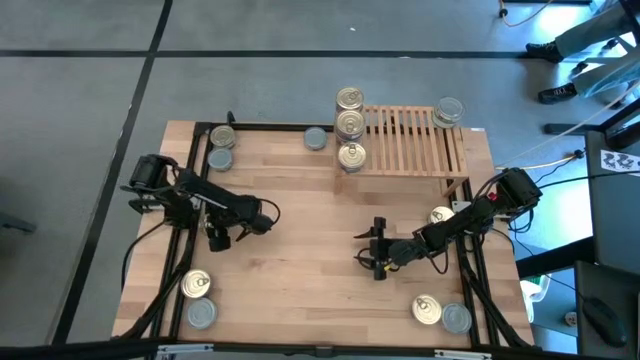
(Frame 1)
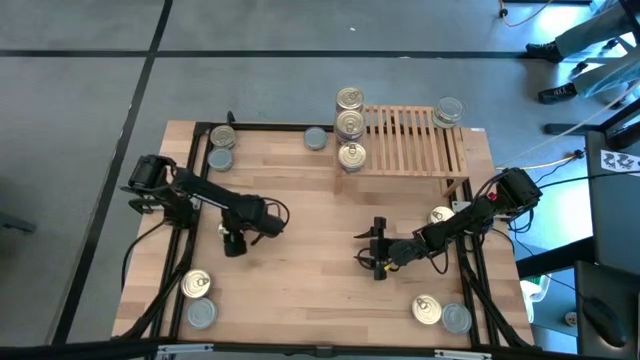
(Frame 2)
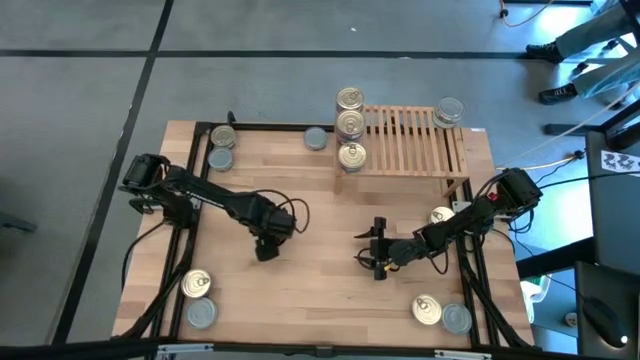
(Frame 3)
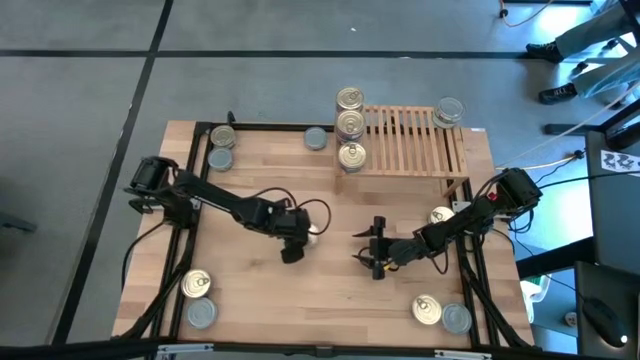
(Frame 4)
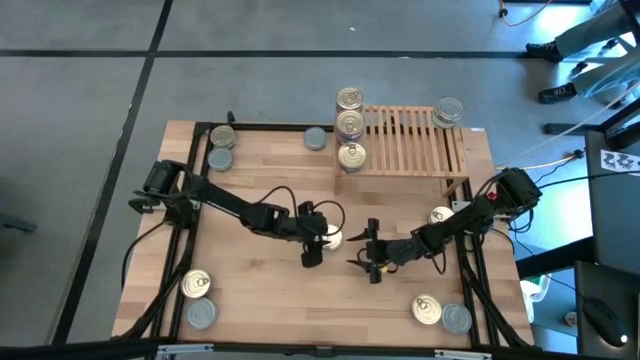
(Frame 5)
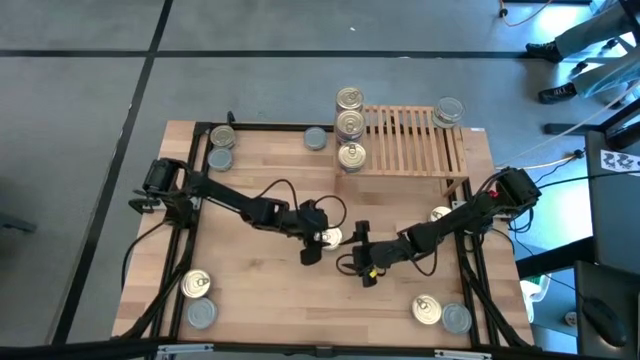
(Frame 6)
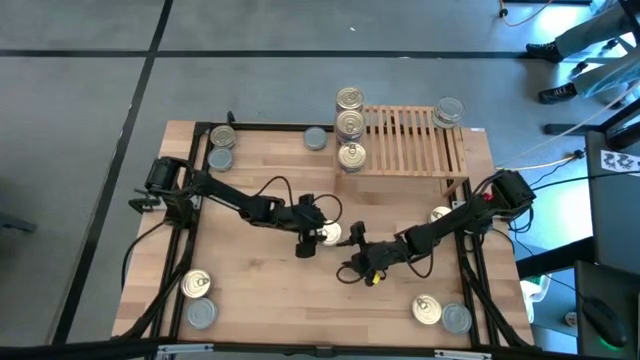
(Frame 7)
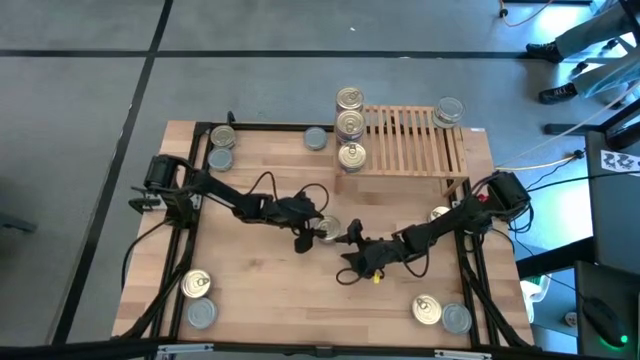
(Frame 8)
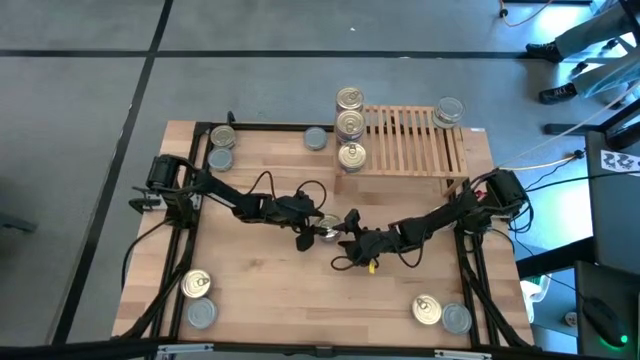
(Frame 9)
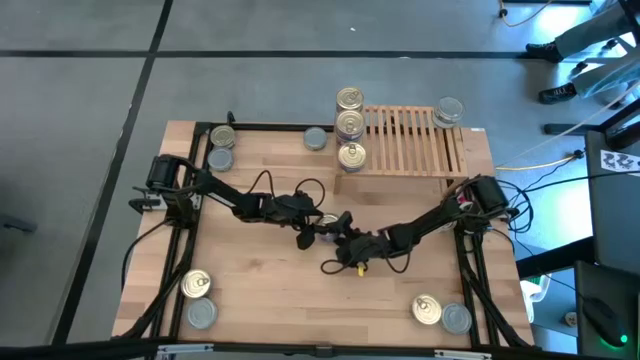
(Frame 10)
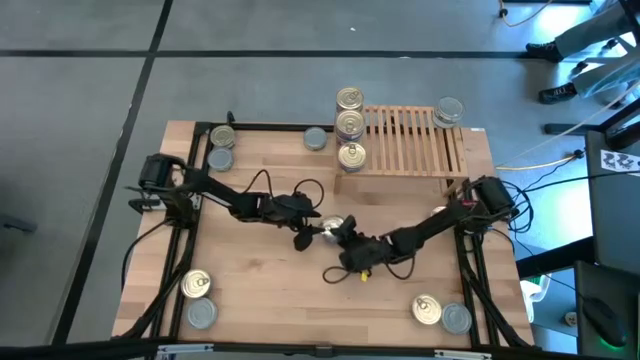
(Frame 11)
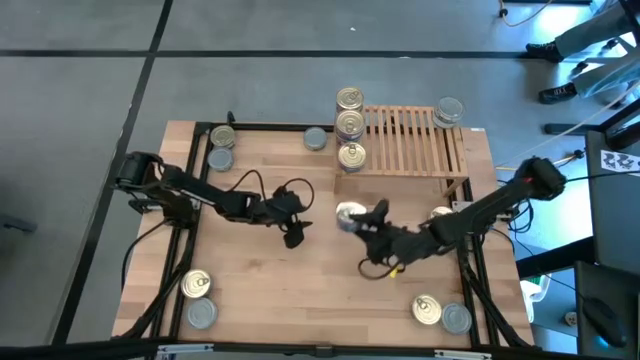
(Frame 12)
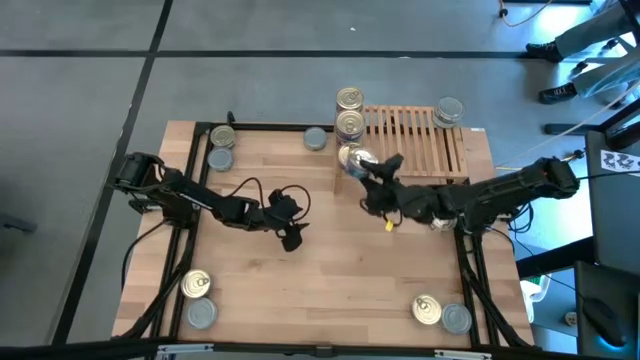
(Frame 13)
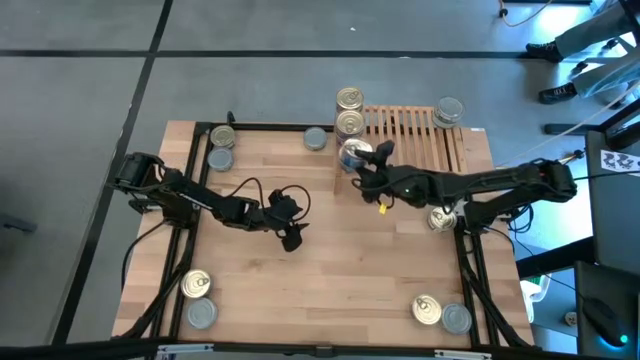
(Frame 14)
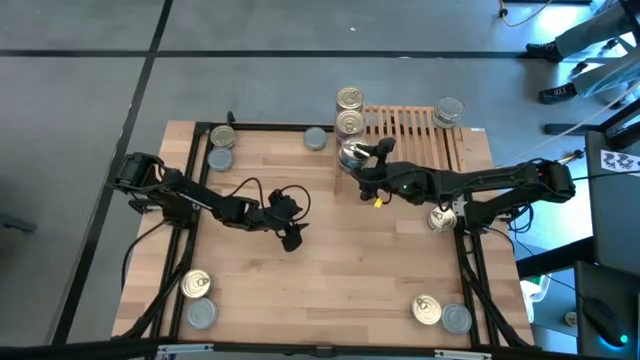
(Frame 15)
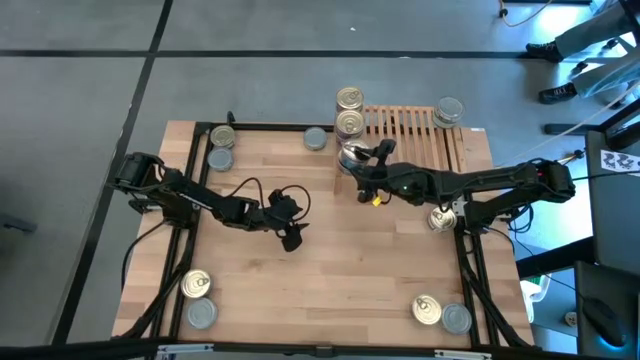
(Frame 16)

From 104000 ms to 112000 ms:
Task: Stack canned seafood by type on shelf
Stack the blue-pink tuna can on top of the blue-pink tuna can on the shelf

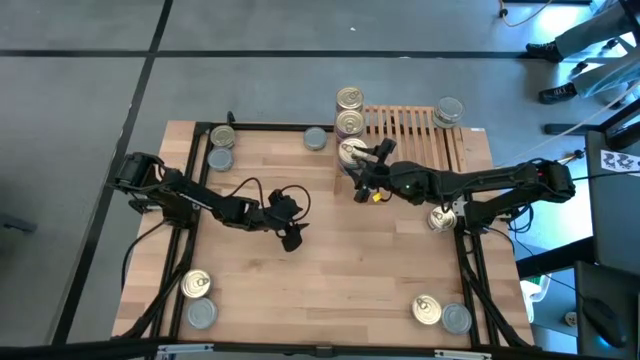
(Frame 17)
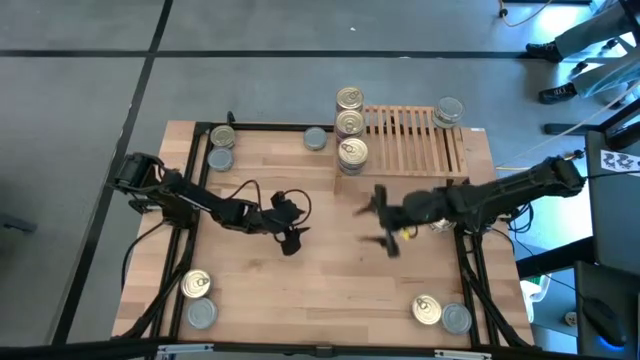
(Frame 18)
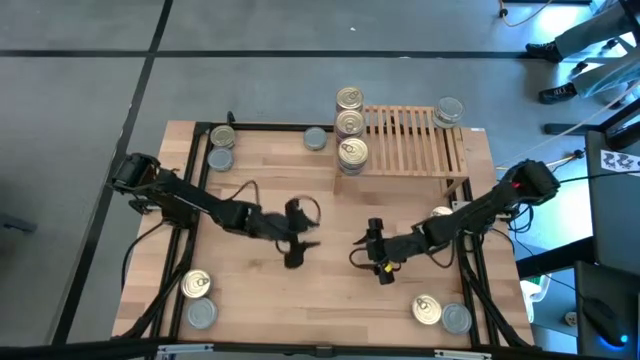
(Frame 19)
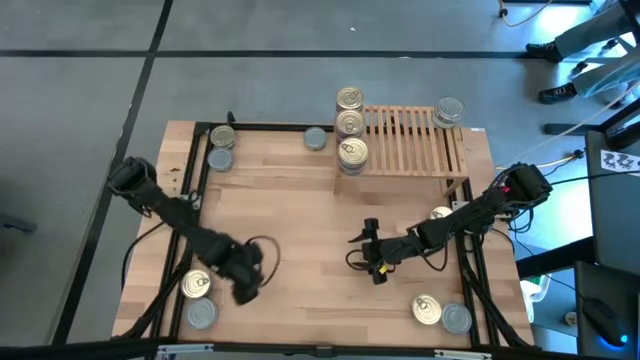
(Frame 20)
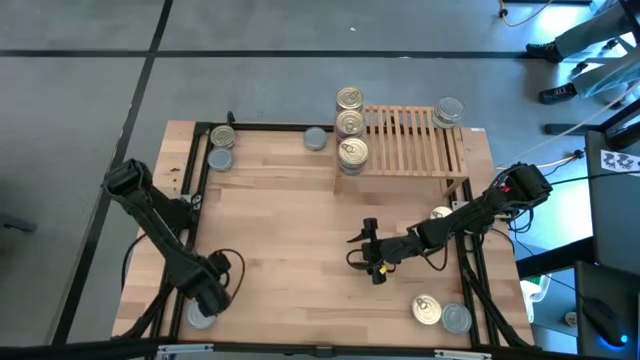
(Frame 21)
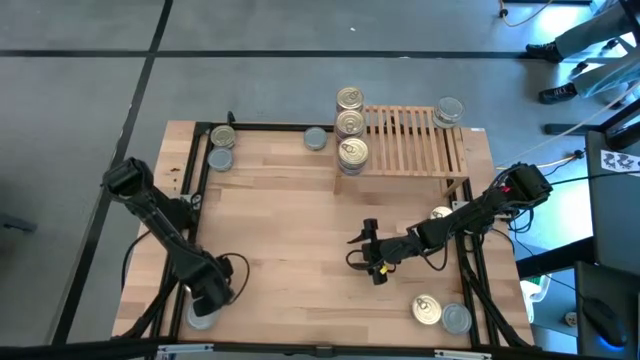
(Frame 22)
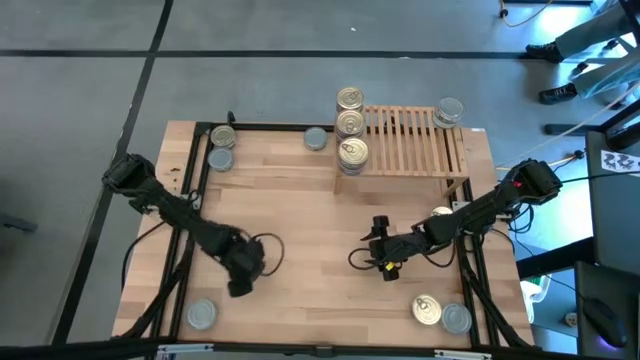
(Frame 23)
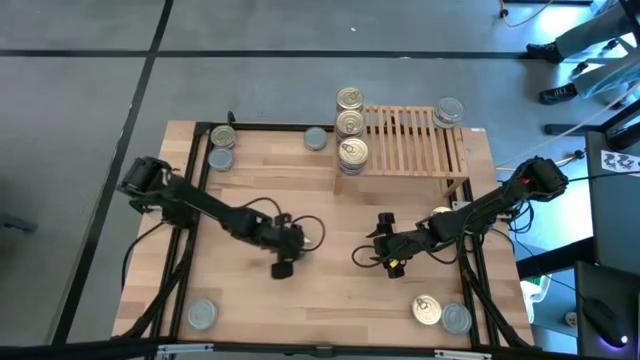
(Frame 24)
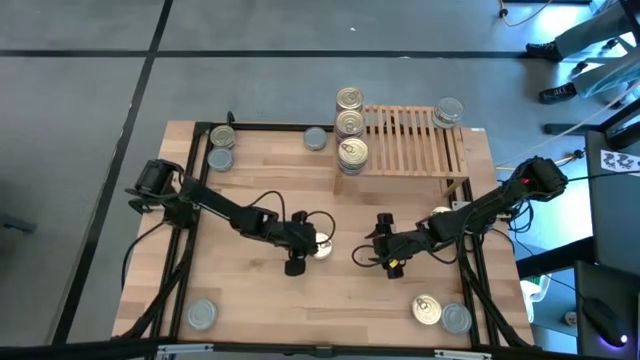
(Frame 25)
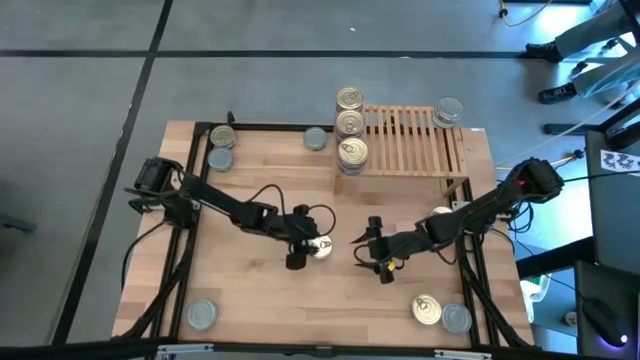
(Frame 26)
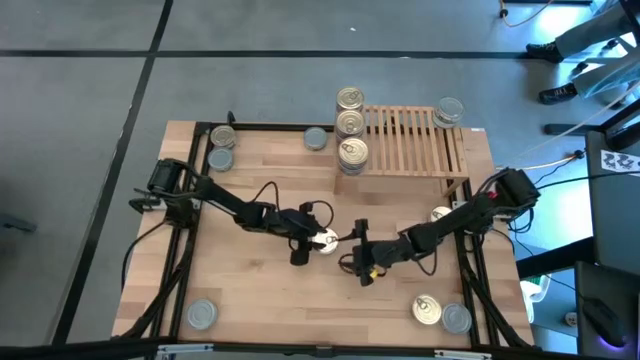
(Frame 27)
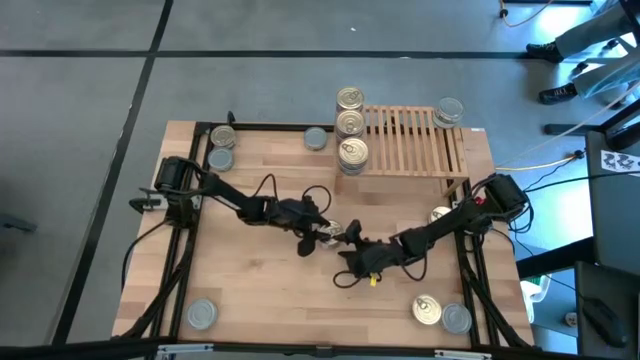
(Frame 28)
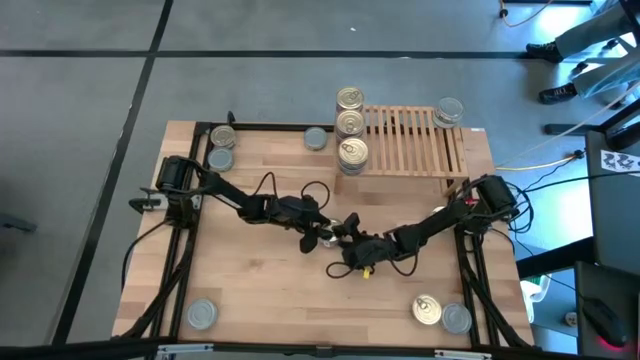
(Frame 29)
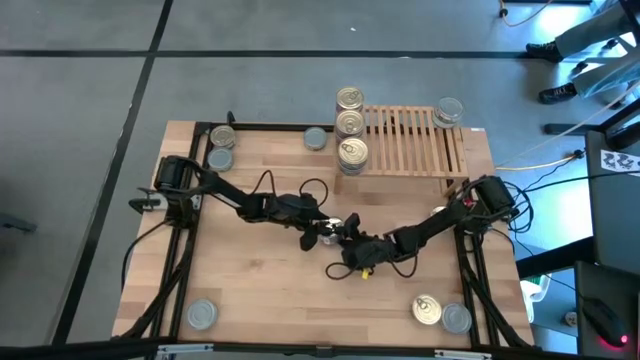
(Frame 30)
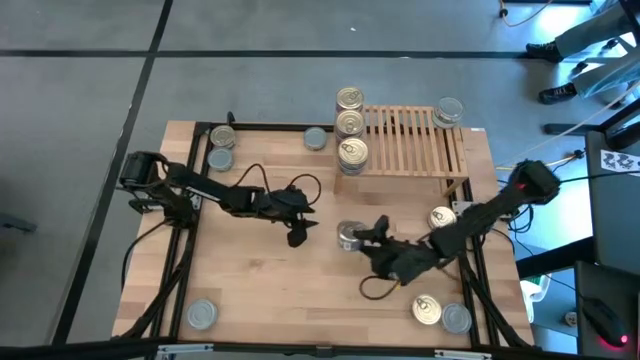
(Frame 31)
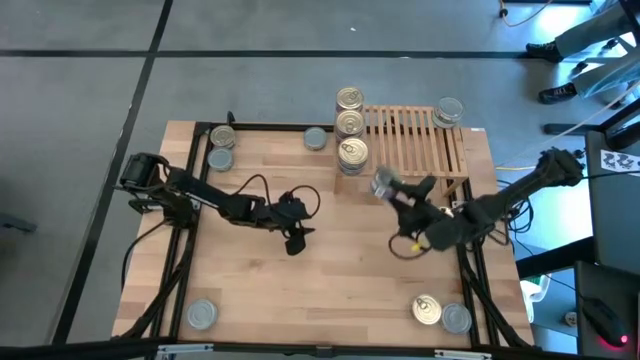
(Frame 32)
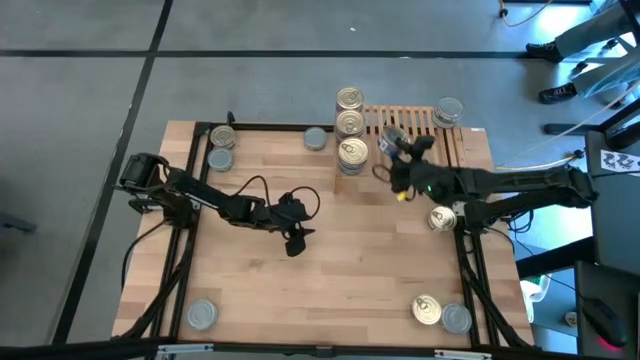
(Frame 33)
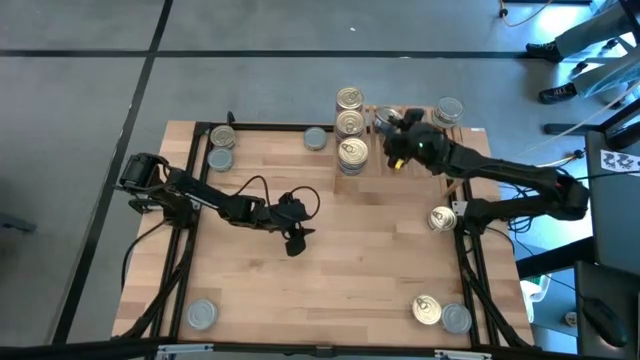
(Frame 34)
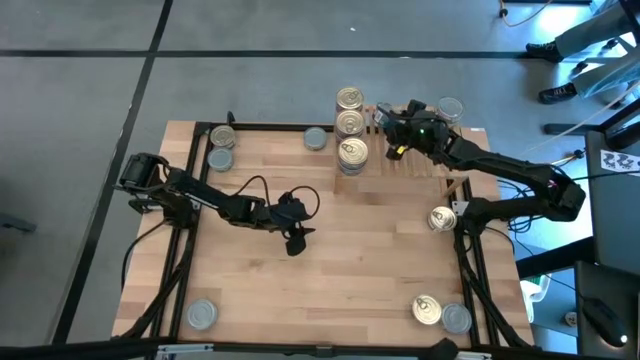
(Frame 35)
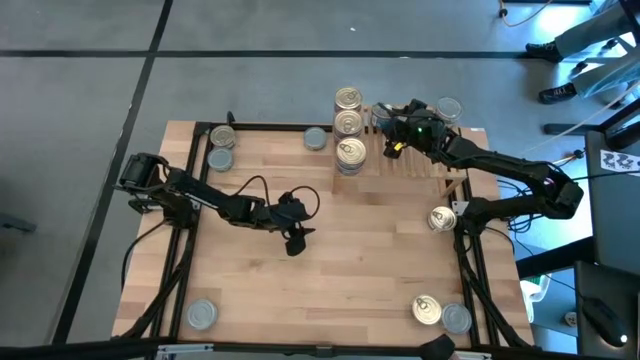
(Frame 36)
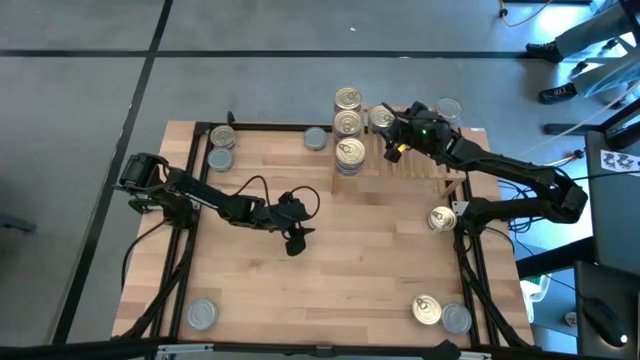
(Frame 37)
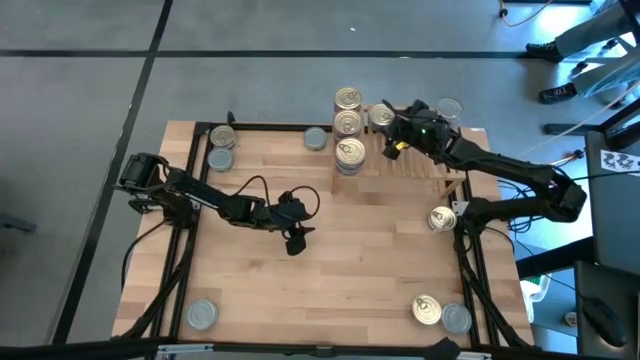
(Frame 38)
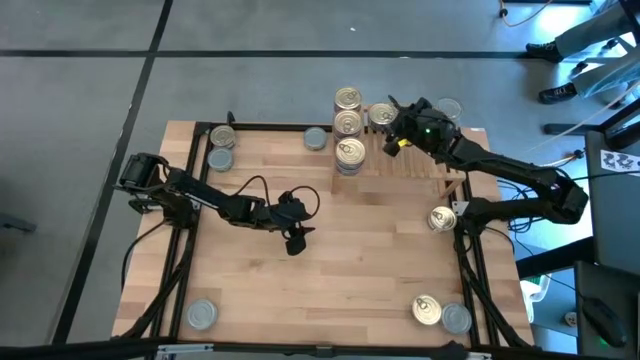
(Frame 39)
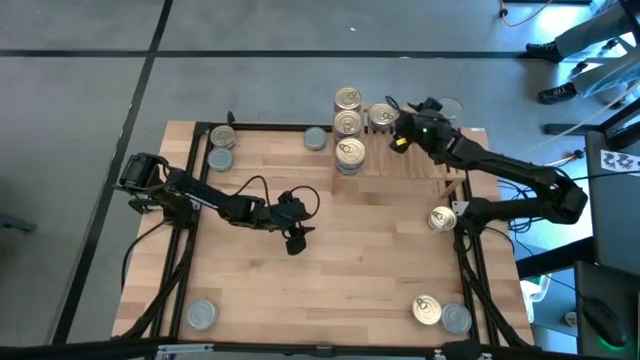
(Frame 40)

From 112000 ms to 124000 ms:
Put the blue-pink tuna can on the shelf

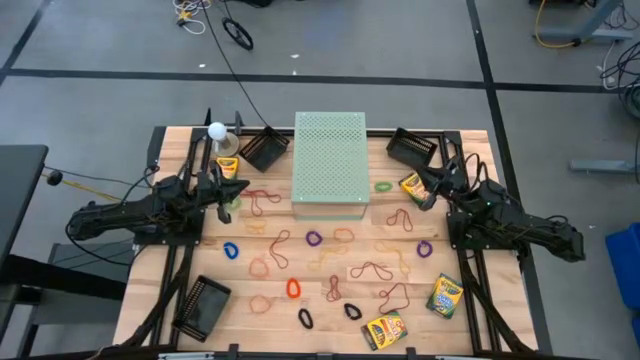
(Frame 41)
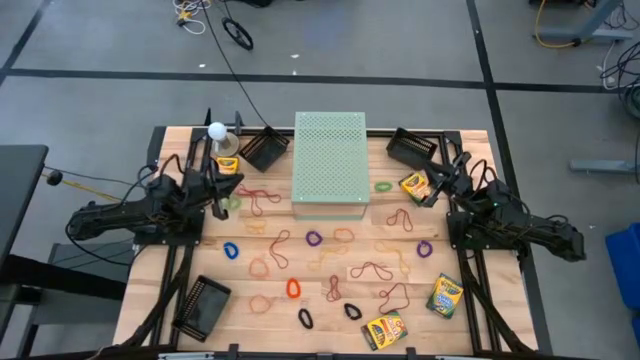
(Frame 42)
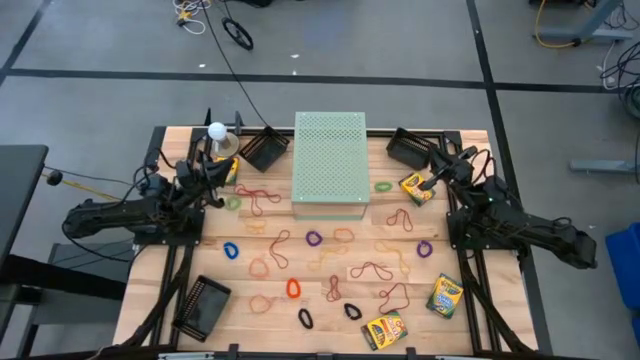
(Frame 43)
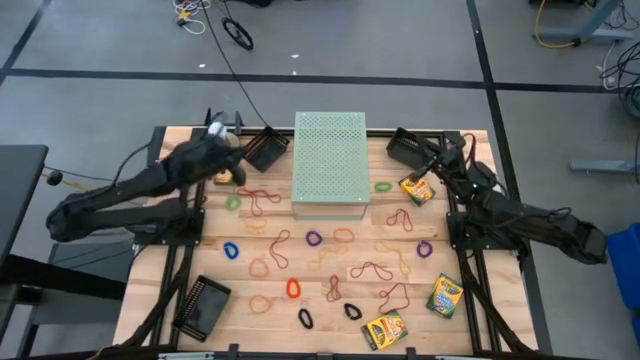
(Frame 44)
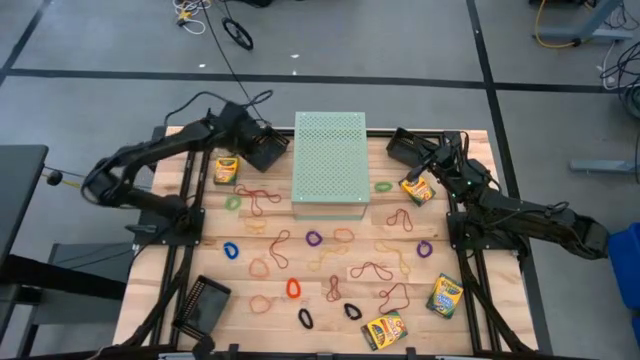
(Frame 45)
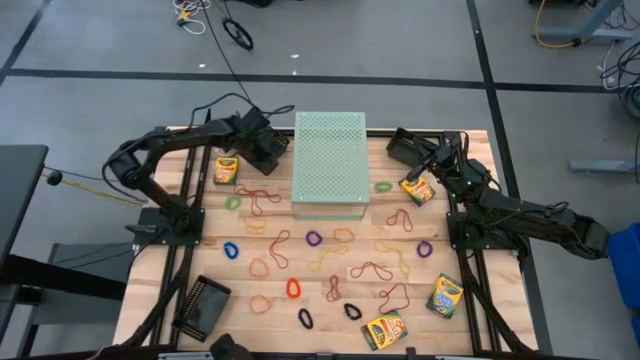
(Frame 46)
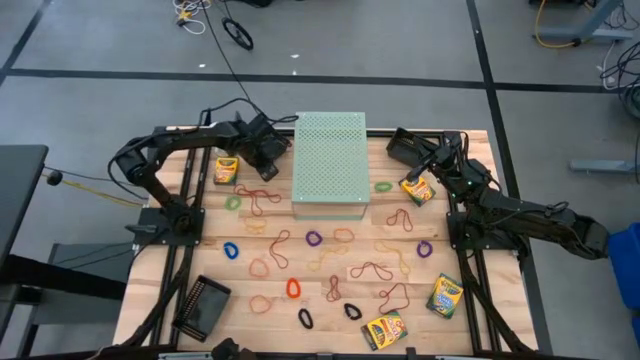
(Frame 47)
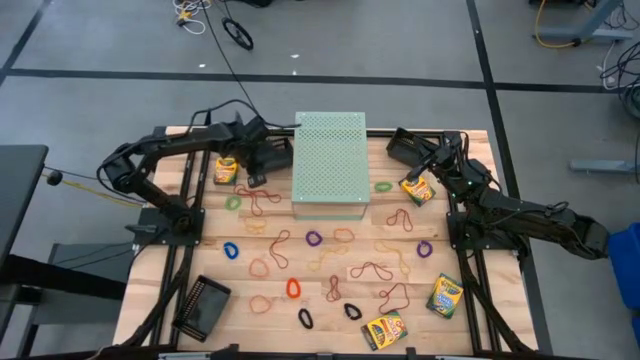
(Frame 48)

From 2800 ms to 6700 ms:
Task: Pick & Place Office Desk Supplies
Put the top left black bin on the shelf
